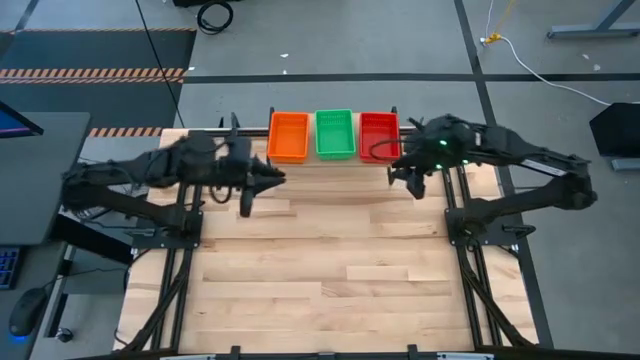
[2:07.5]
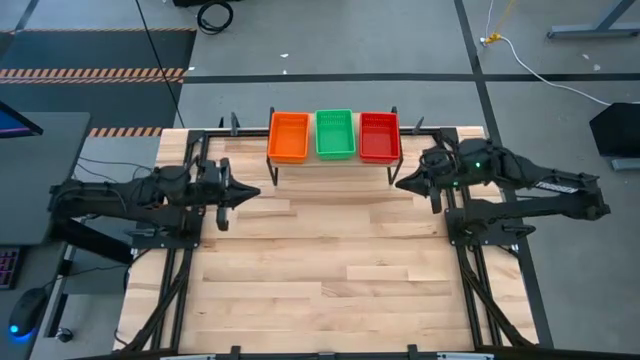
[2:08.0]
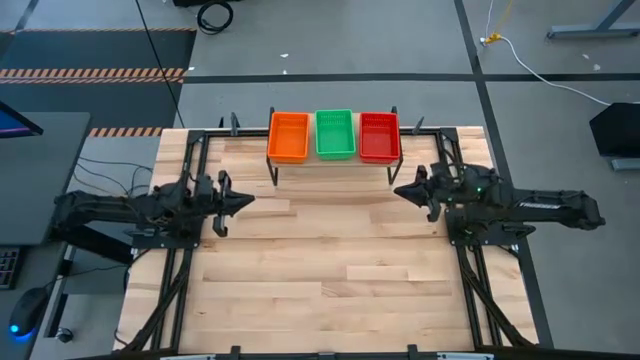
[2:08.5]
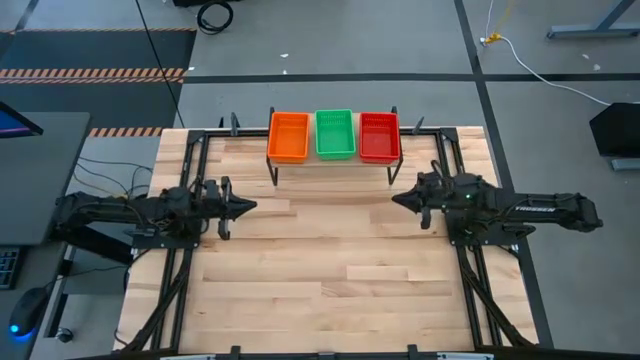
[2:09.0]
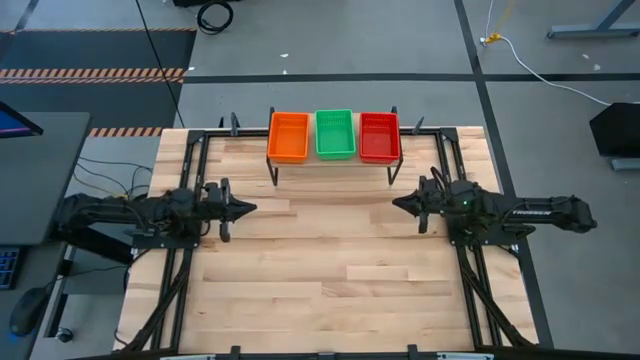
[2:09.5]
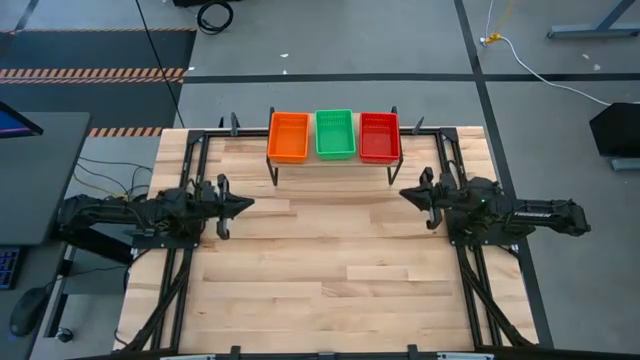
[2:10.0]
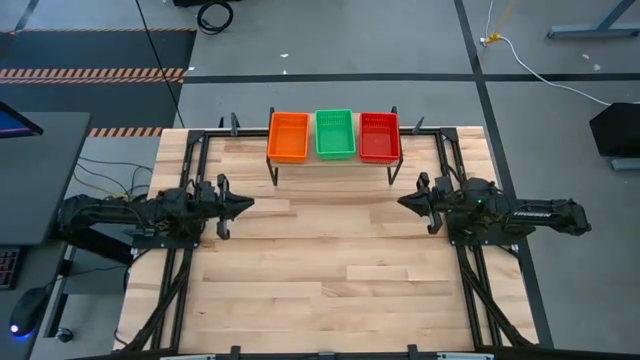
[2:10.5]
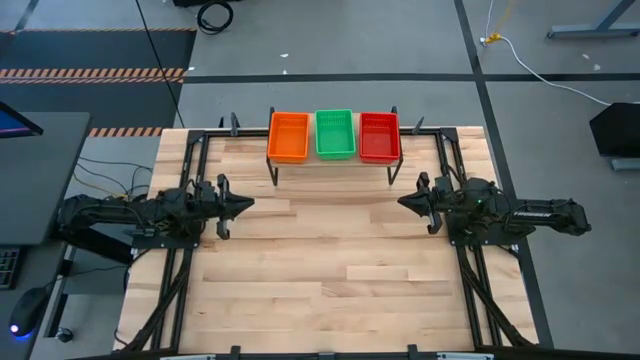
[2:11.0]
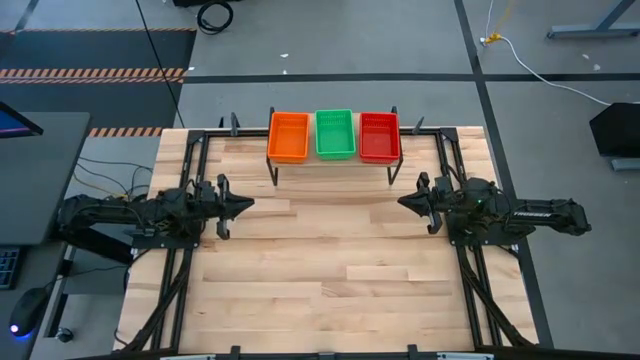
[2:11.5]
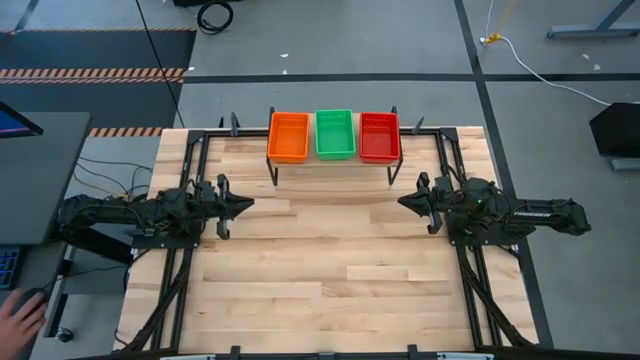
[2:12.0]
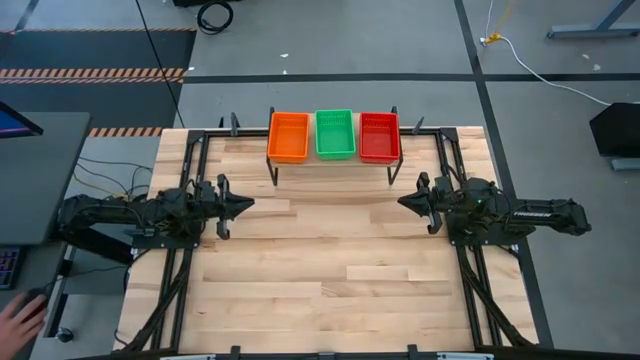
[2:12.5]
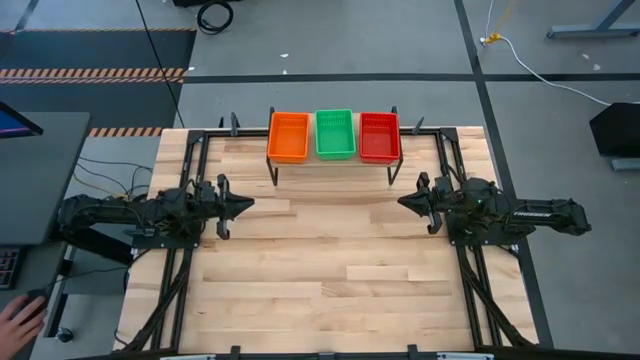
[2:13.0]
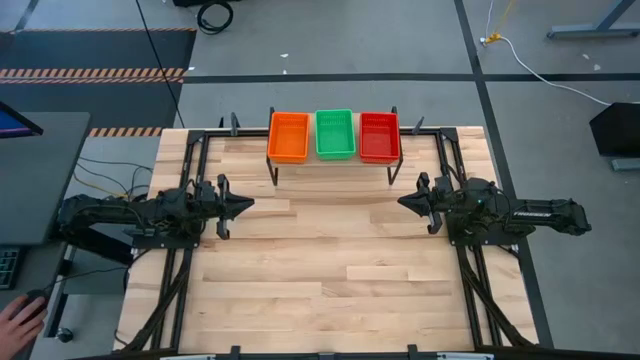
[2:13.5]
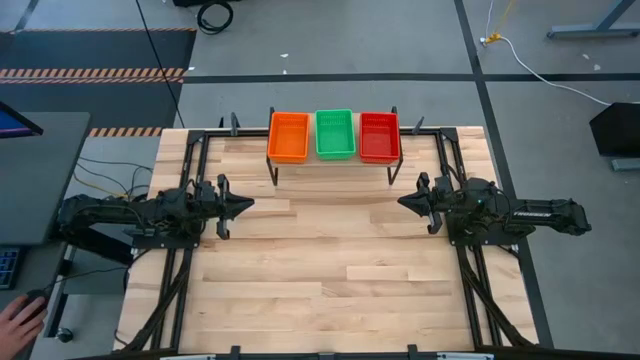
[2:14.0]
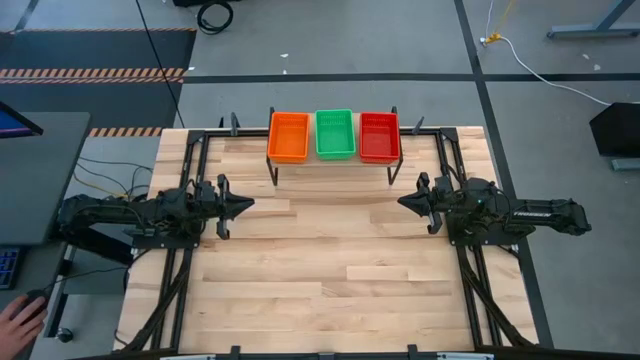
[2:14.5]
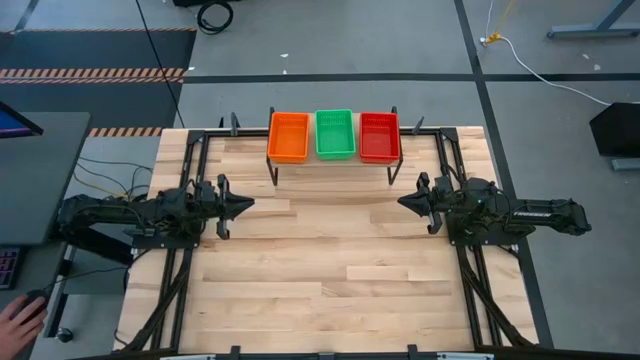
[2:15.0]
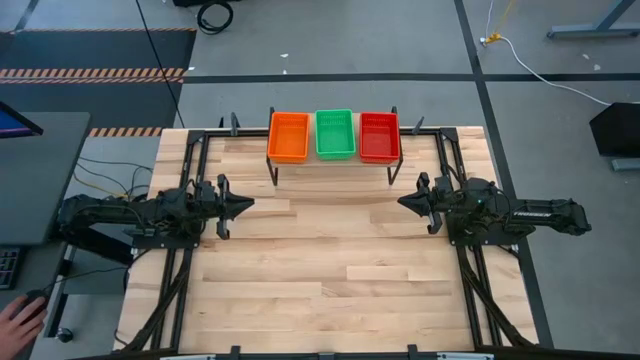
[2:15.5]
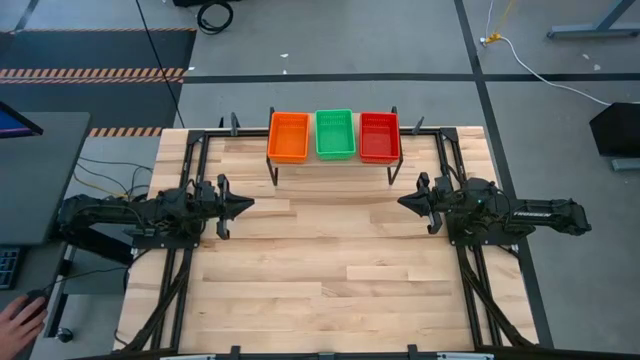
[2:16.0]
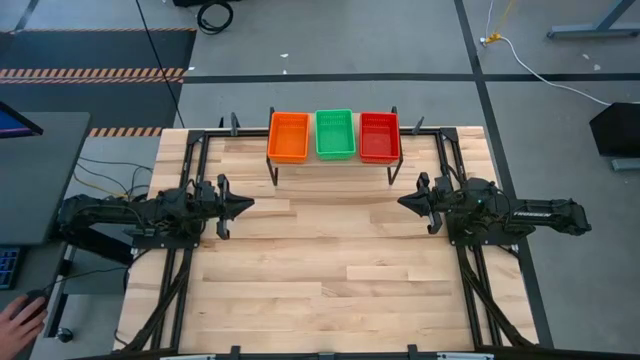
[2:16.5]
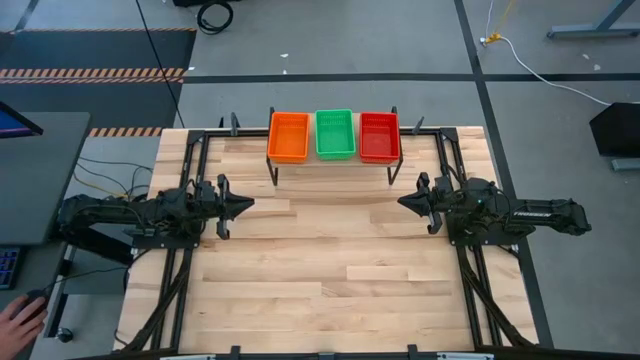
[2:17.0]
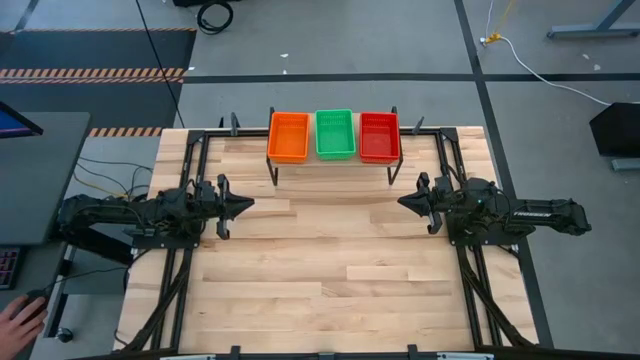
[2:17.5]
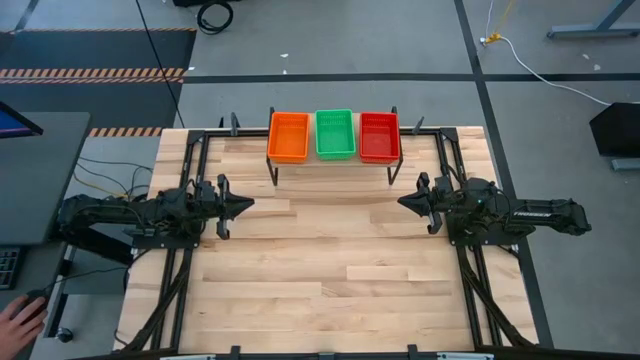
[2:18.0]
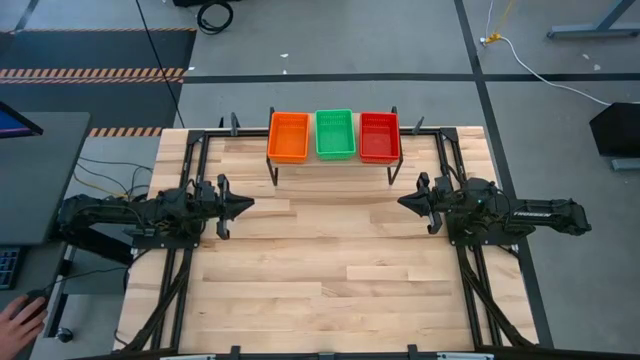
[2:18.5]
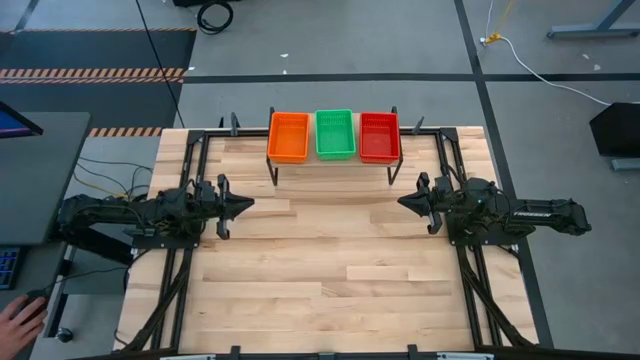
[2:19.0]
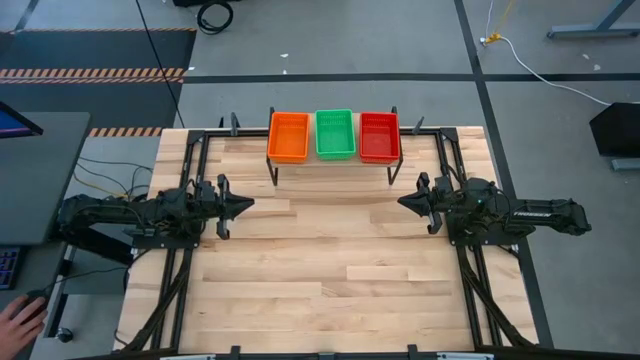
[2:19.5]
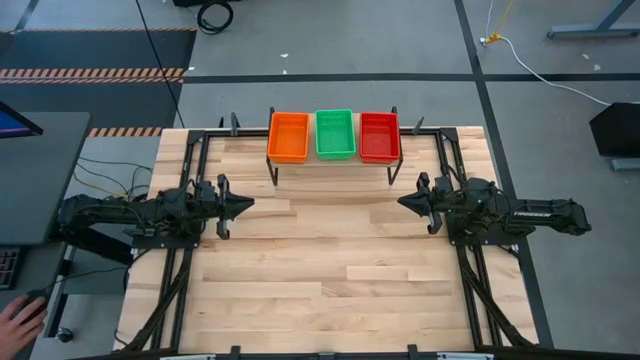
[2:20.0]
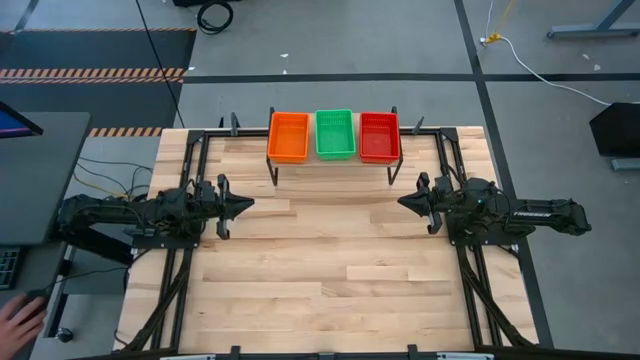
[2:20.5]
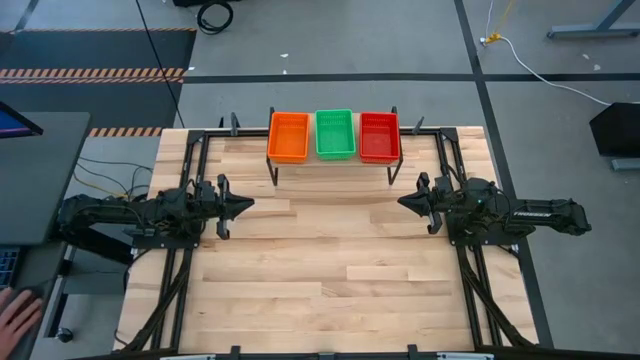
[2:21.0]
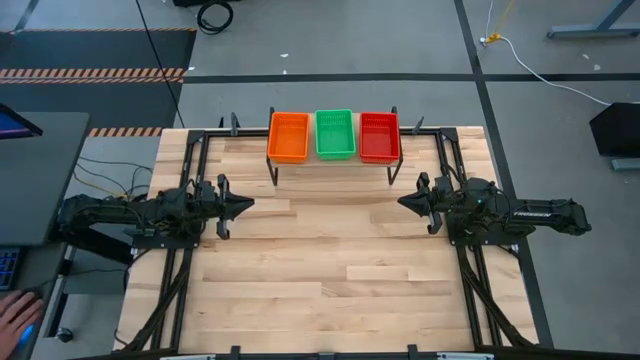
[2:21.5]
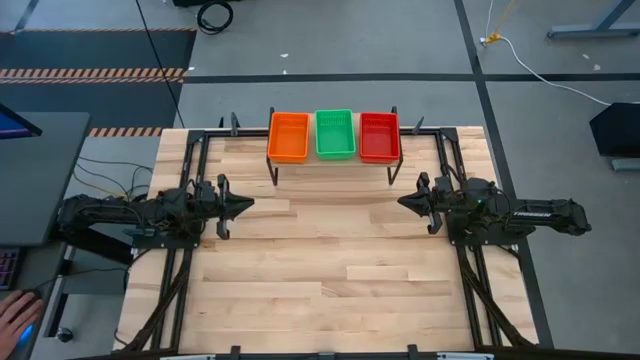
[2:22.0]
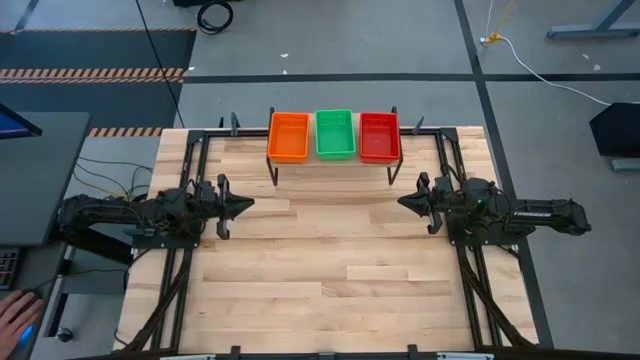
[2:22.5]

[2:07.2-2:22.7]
Task: Stack baskets on shelf by color
Return to Home Position

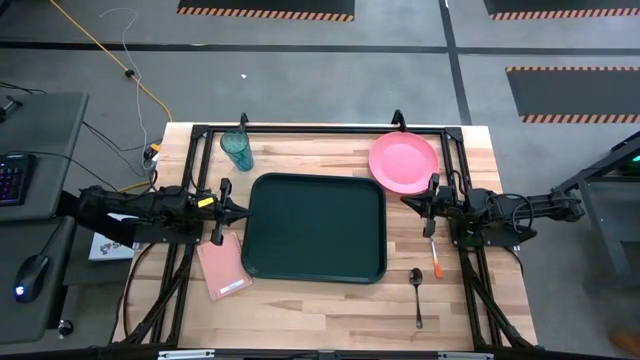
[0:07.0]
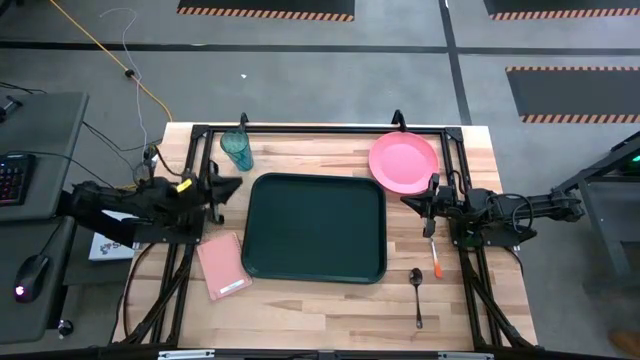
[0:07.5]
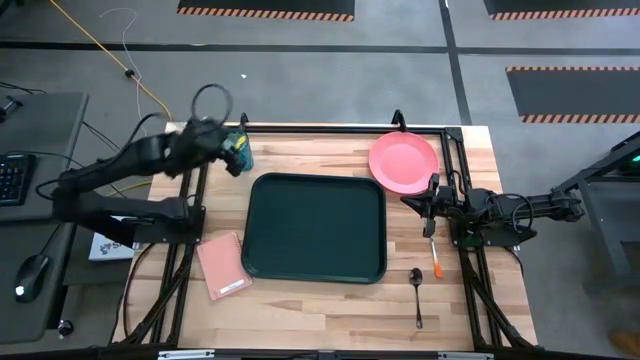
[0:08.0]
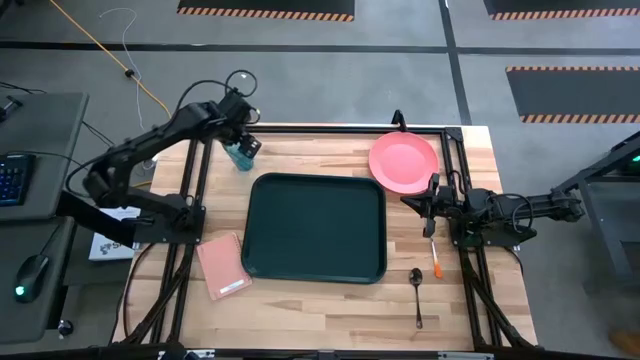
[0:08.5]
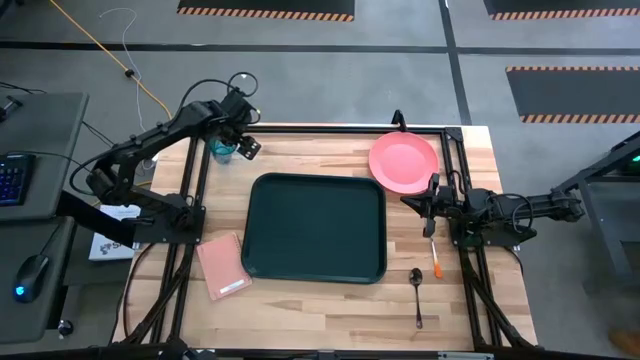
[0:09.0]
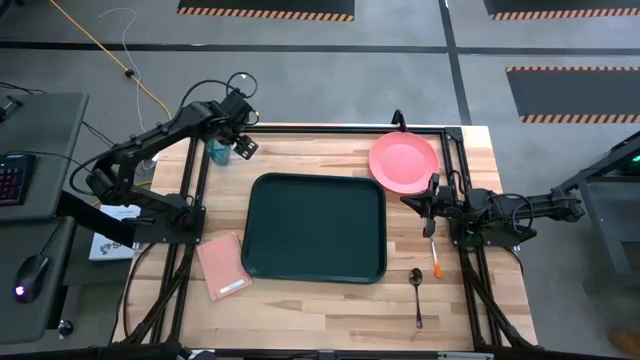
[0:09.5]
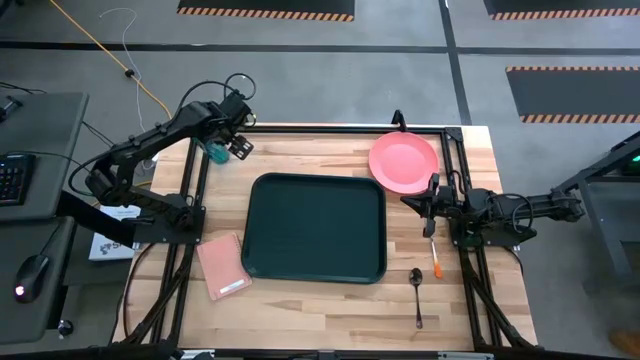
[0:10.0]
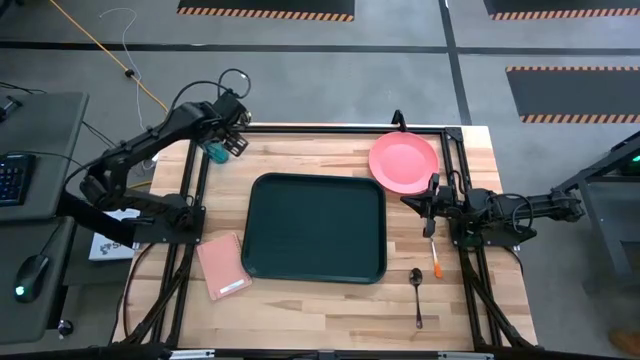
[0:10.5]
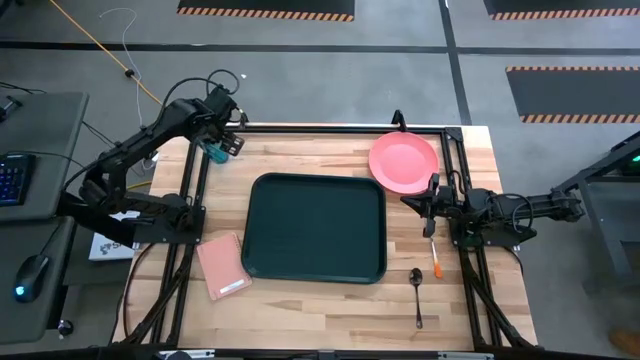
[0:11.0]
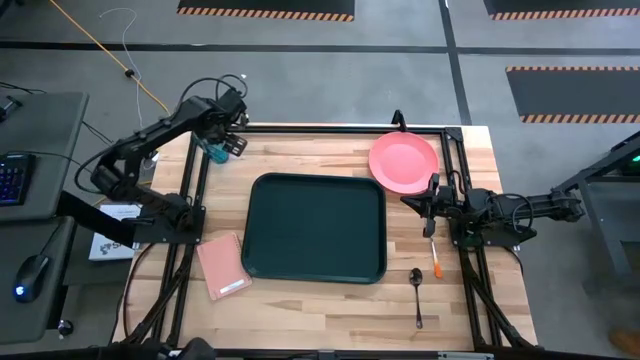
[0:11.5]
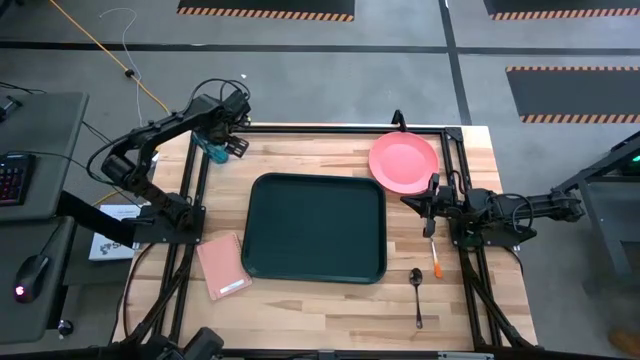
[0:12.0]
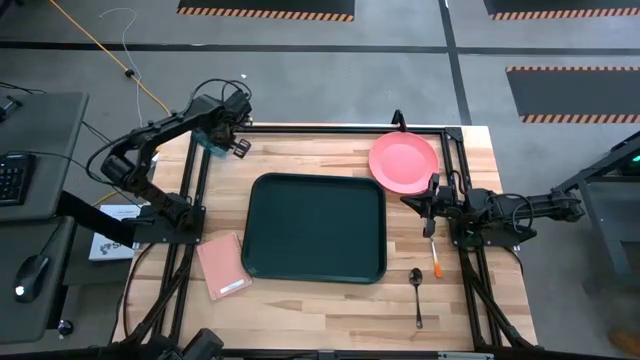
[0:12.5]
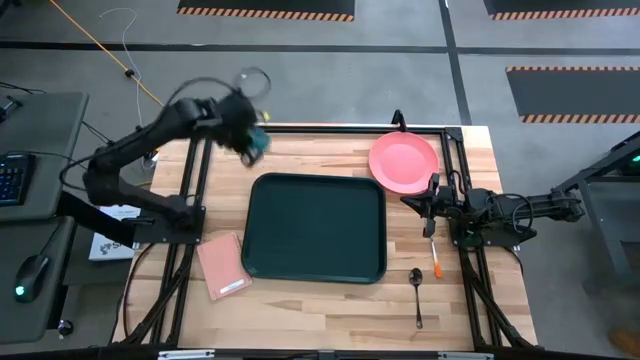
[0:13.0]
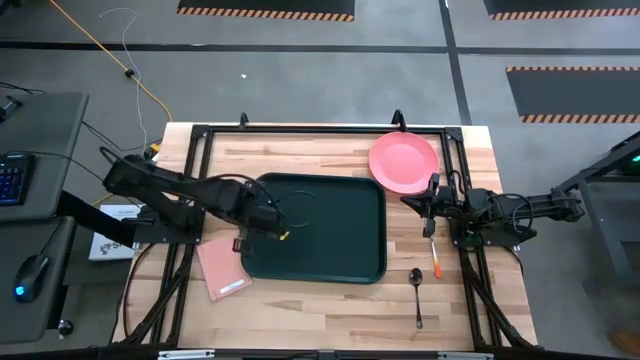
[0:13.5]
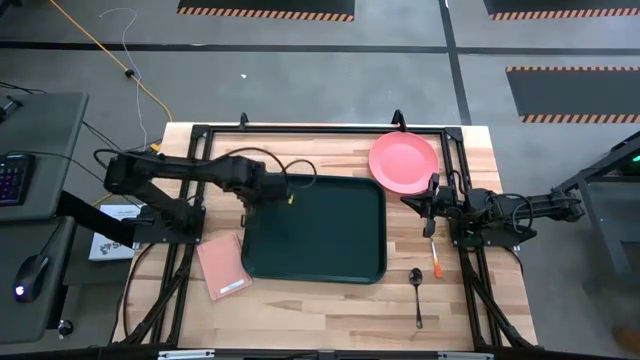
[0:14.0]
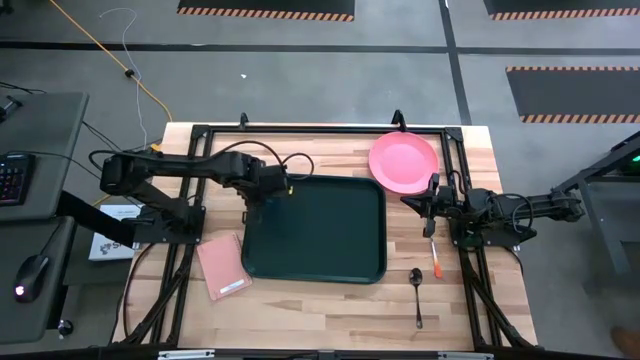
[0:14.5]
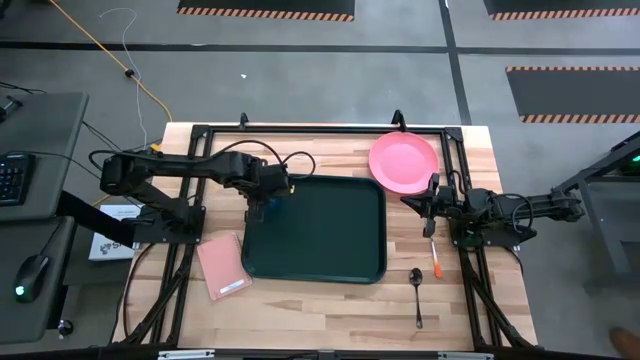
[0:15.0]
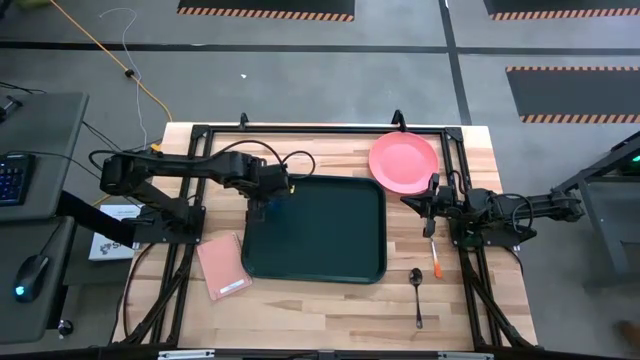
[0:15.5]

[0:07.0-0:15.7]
Task: Pick and place plate/cup/fork/spoon on tray
Put the blue cup on the black tray
